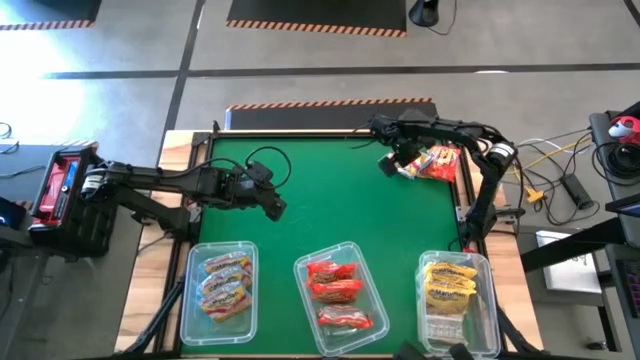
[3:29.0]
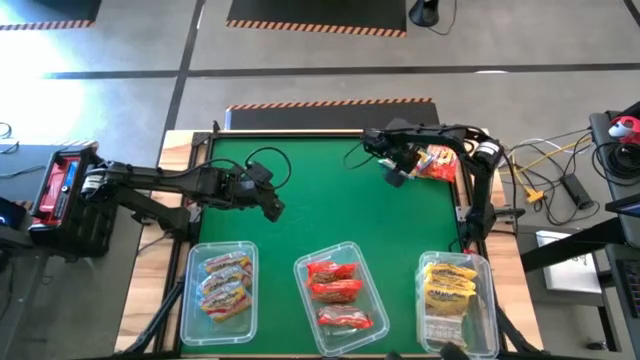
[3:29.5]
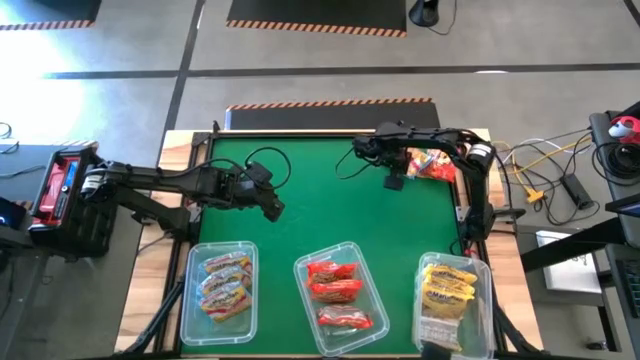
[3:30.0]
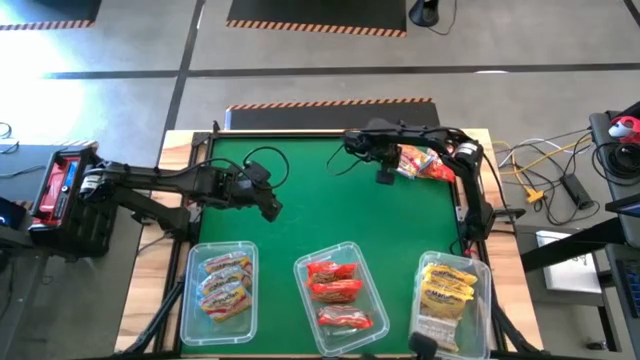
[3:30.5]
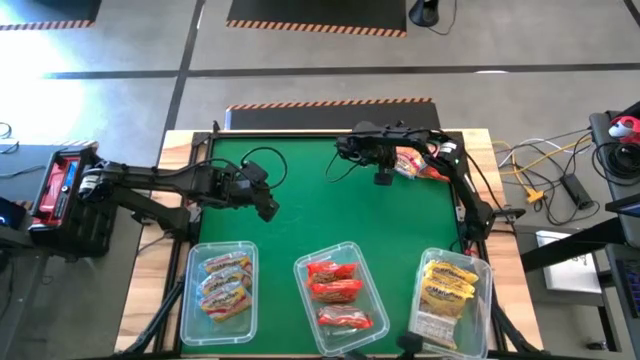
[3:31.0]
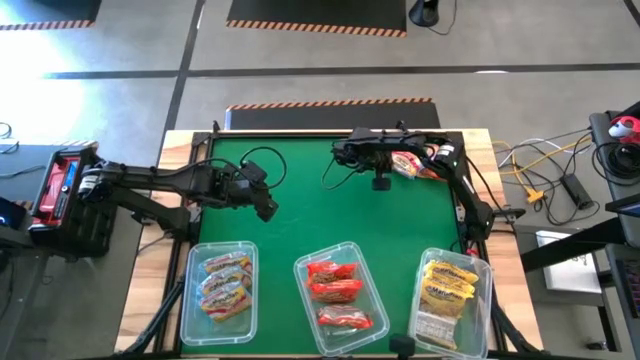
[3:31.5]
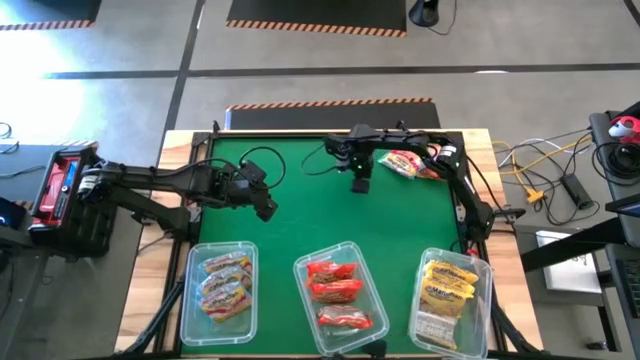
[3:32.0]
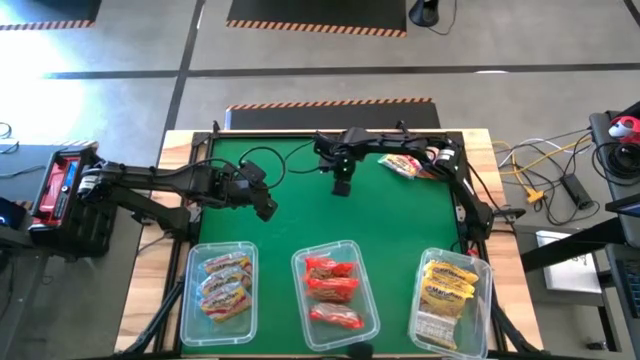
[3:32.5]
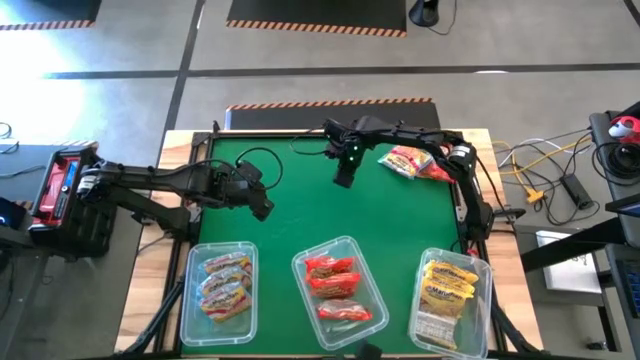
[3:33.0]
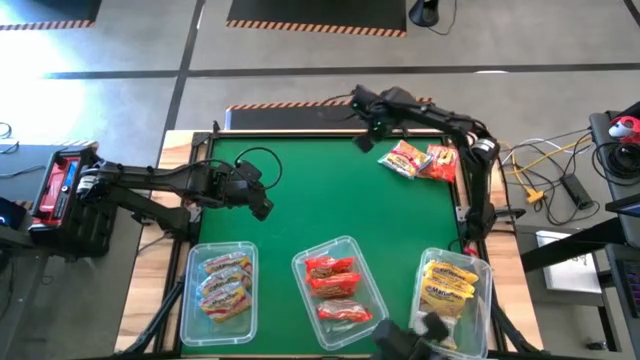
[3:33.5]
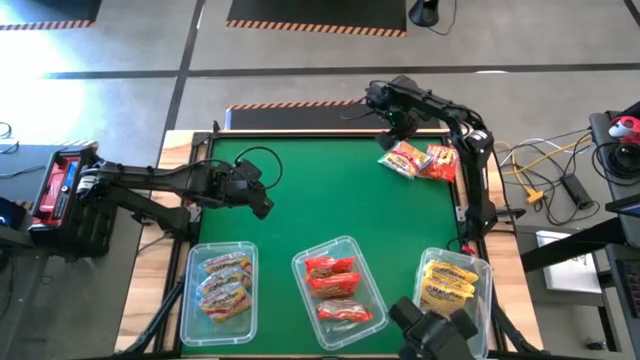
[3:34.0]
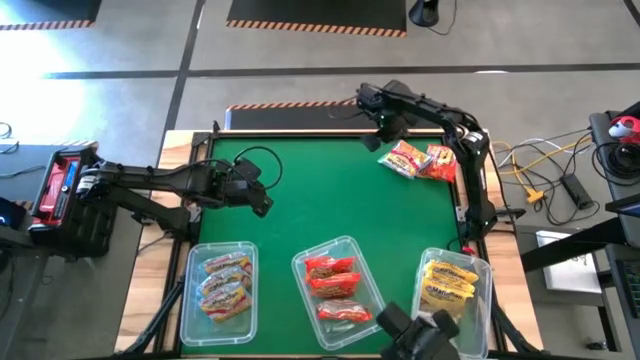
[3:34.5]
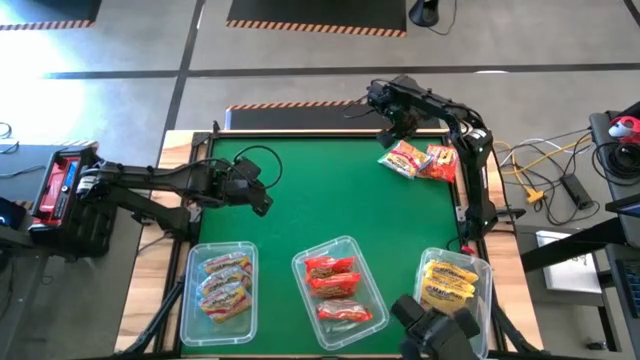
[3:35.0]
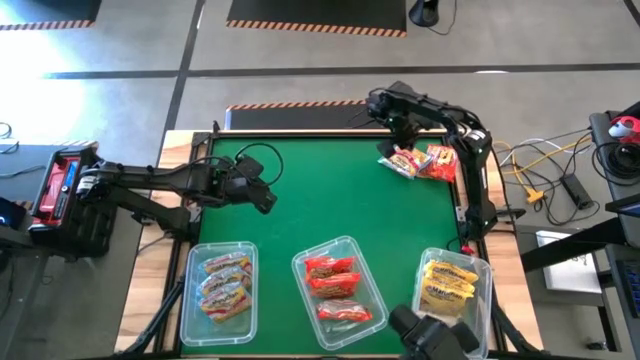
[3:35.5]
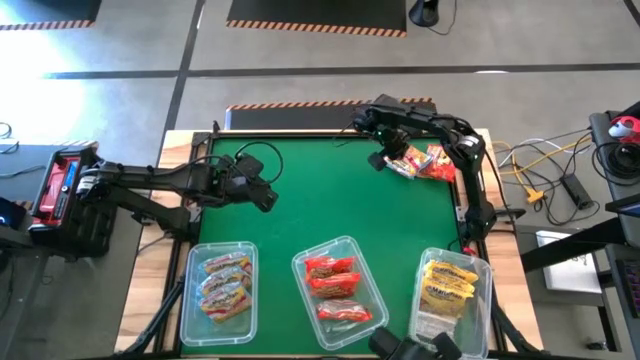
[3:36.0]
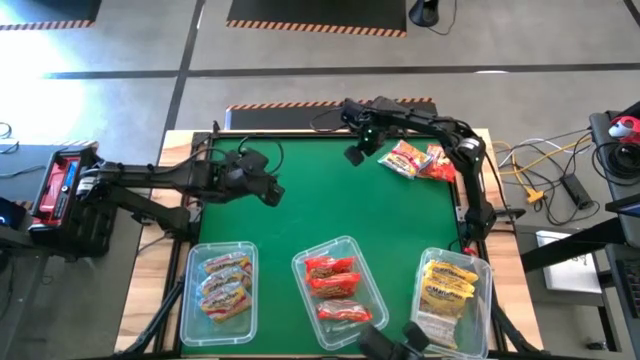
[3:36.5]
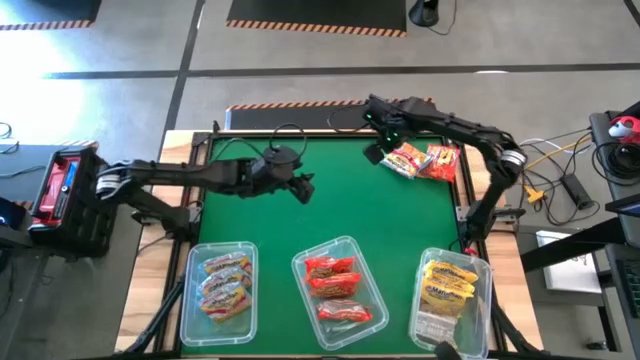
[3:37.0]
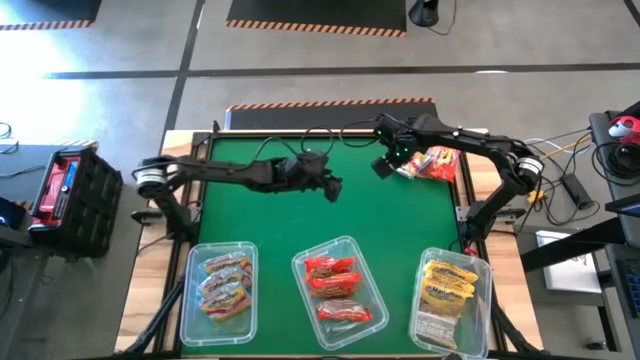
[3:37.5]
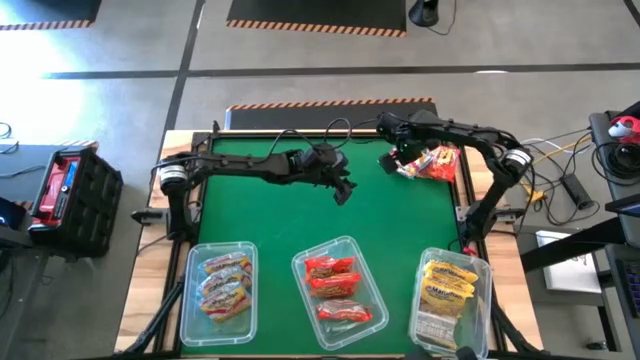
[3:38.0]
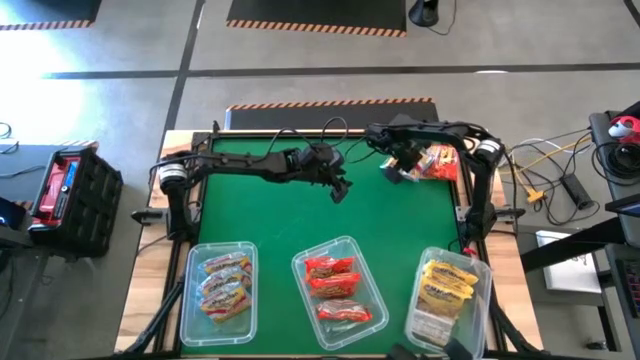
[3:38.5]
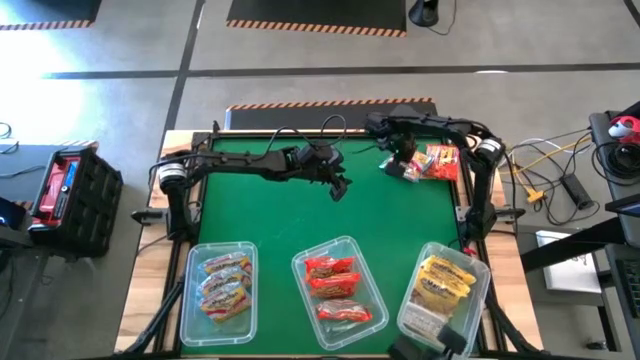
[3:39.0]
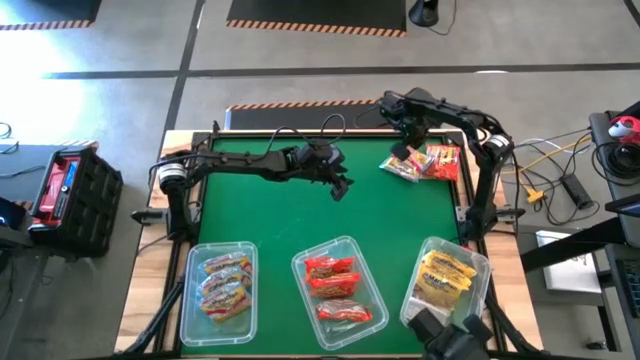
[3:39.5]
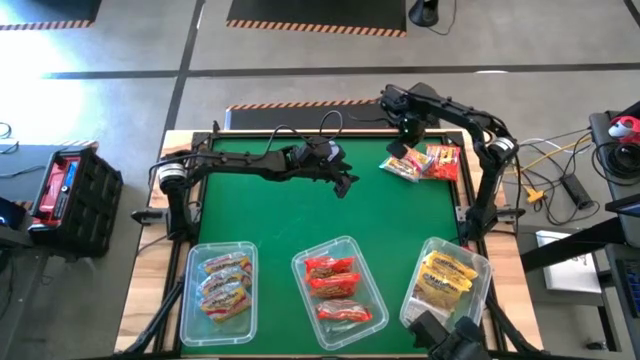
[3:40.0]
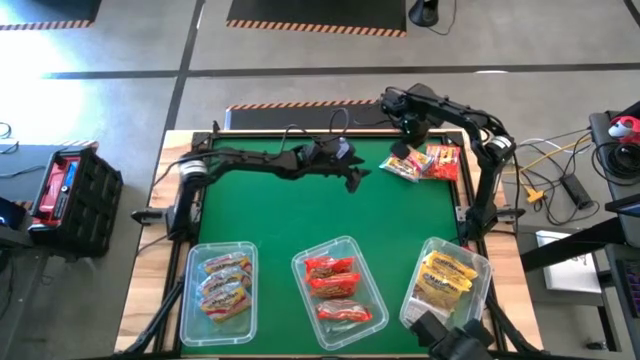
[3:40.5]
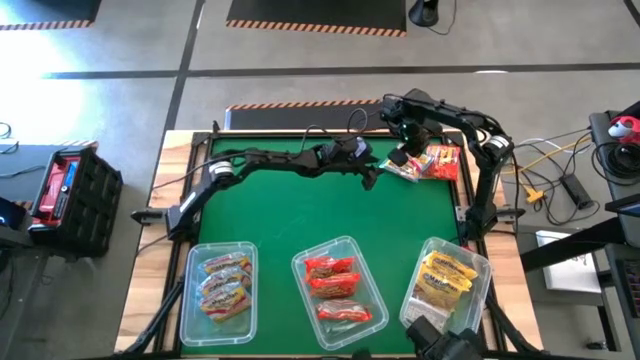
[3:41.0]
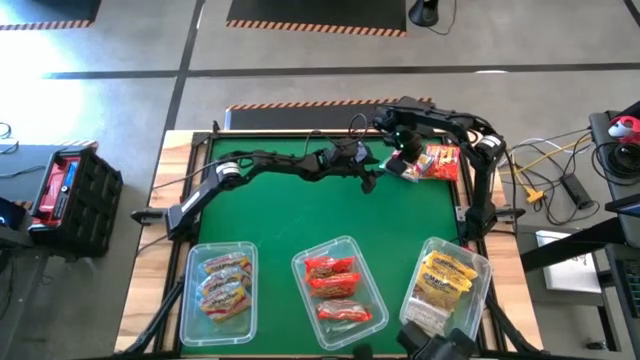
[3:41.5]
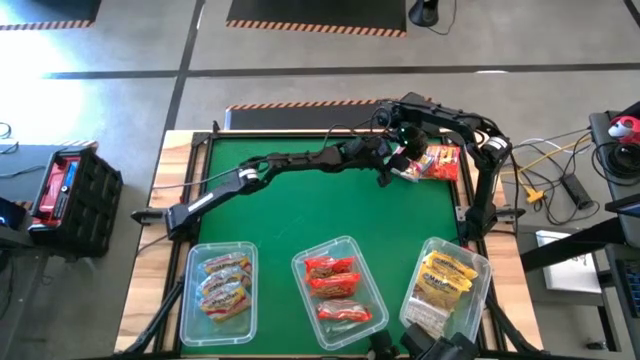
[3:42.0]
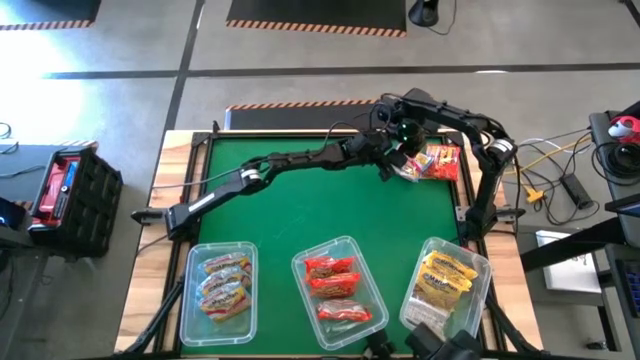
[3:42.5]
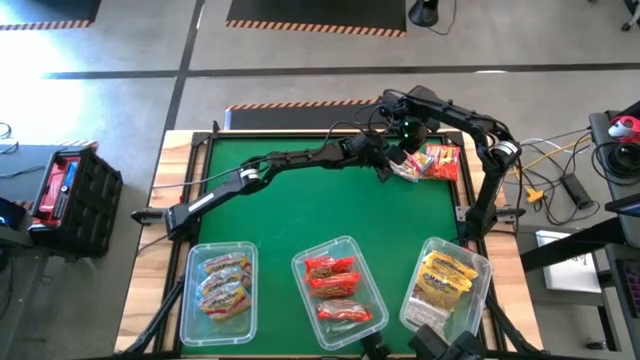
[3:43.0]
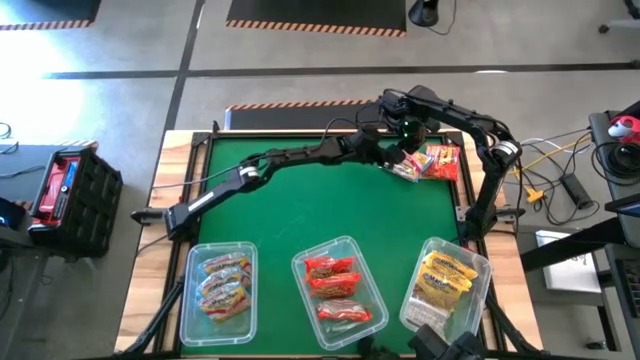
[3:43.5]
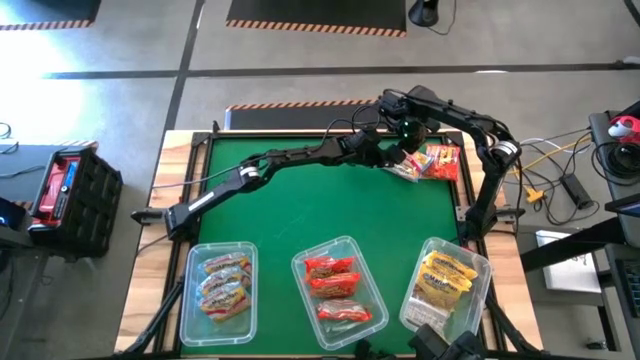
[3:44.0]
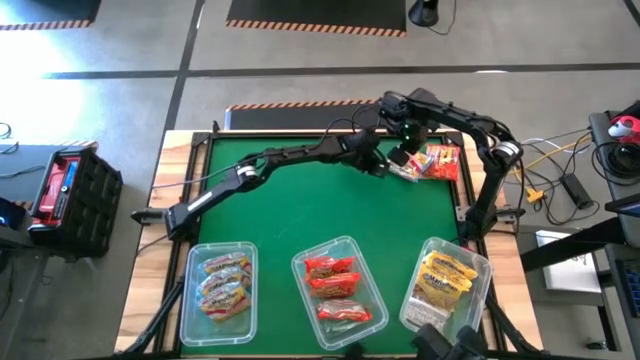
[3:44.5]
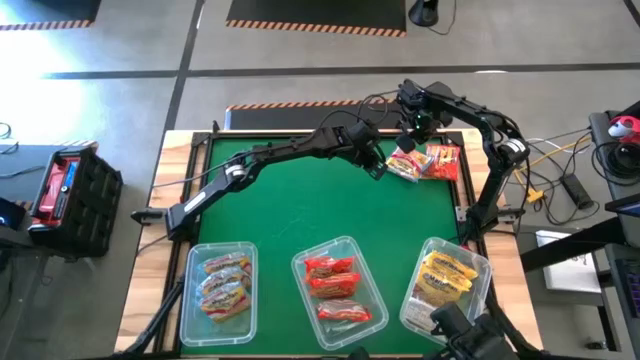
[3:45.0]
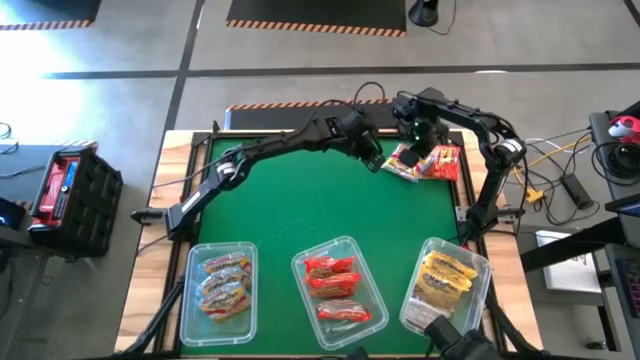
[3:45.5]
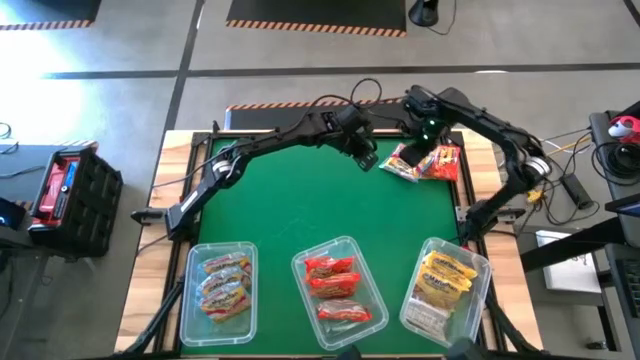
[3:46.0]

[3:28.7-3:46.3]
Task: Sort Maruchan noodles
Put the blue noodle pack into the left transparent bin

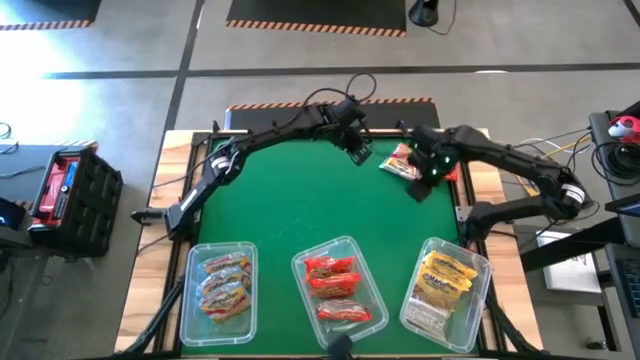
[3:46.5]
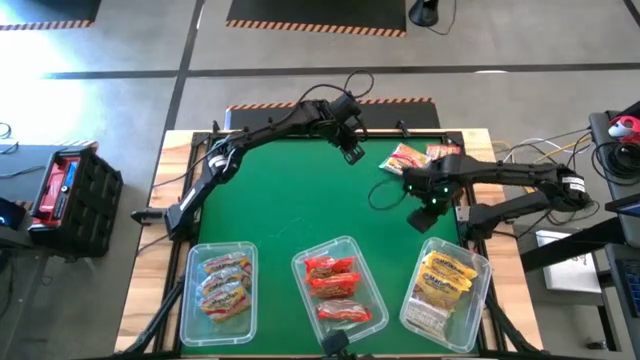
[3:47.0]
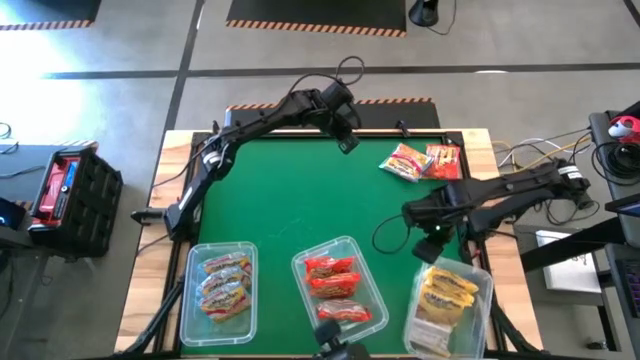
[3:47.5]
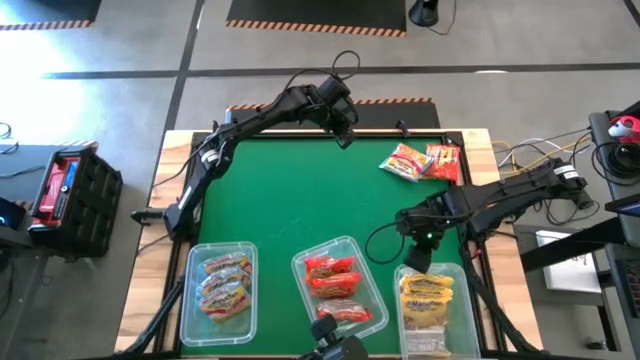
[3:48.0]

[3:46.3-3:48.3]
Adjust the right transparent bin

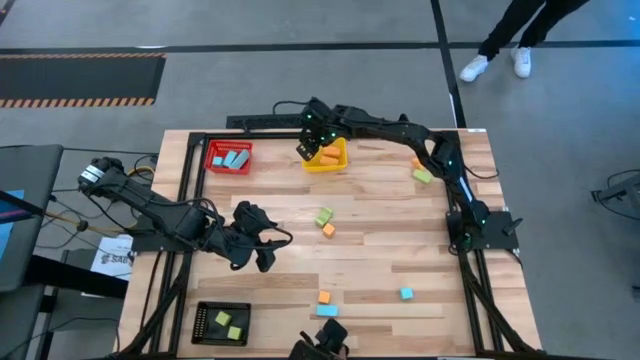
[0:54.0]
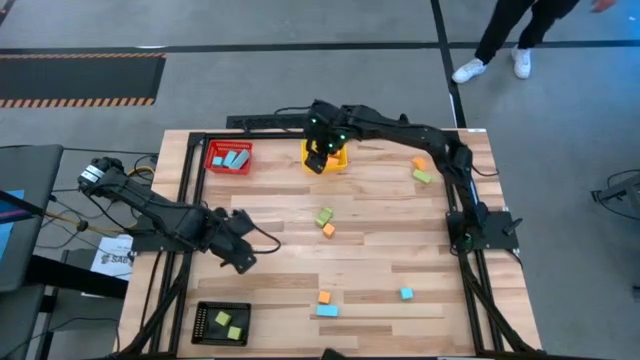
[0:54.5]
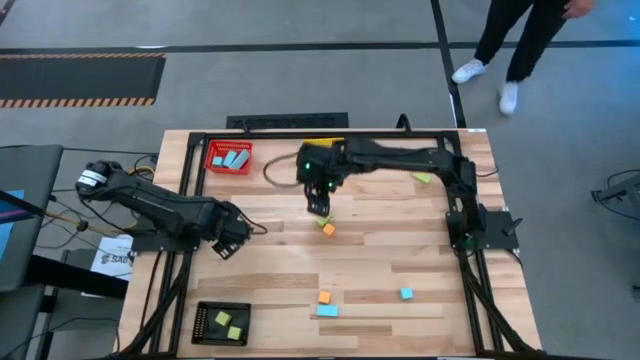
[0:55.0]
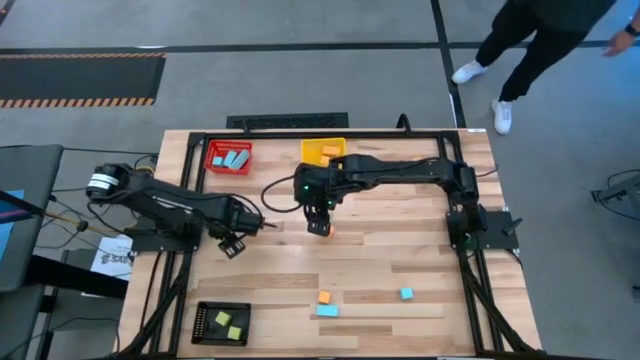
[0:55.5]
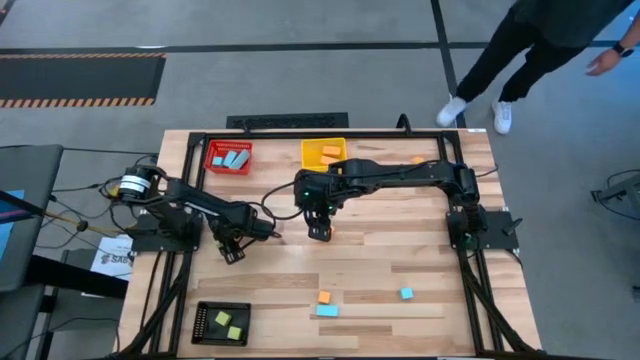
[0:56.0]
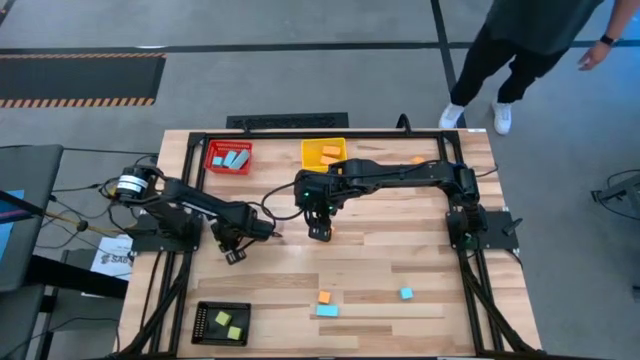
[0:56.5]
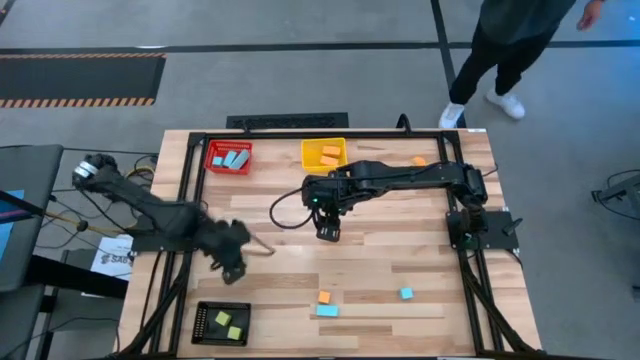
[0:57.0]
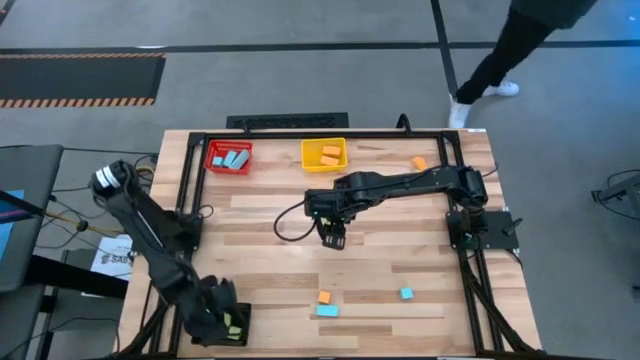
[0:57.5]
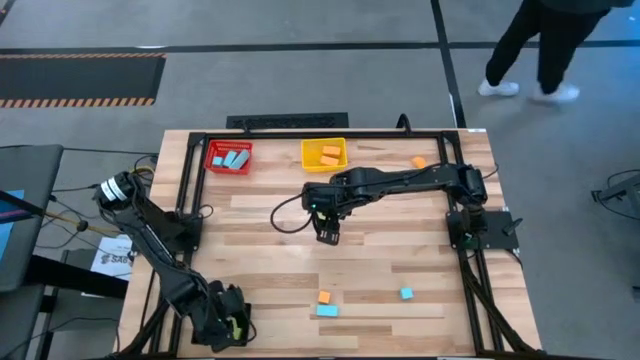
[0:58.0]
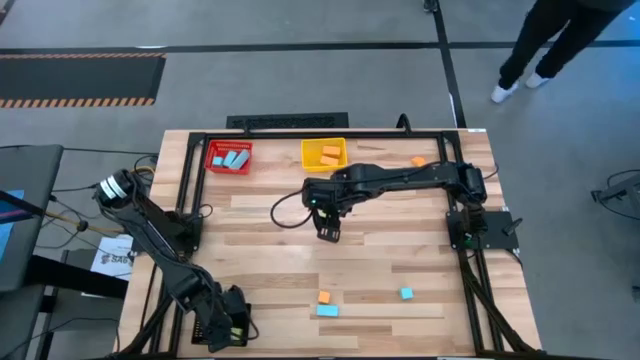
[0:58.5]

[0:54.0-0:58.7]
Task: Sort & place blocks by color
Put the wooden green block into the black bin
